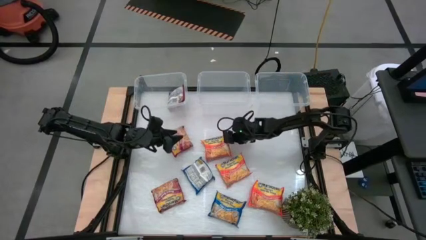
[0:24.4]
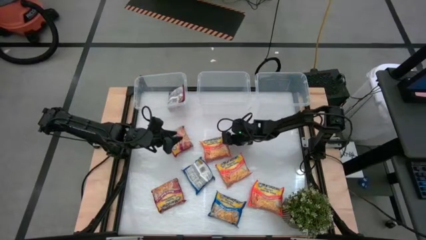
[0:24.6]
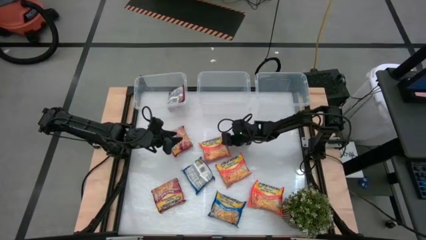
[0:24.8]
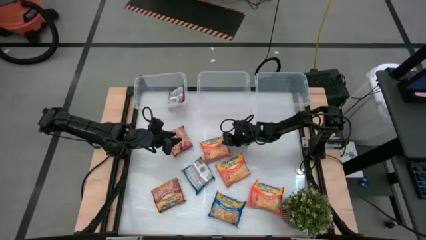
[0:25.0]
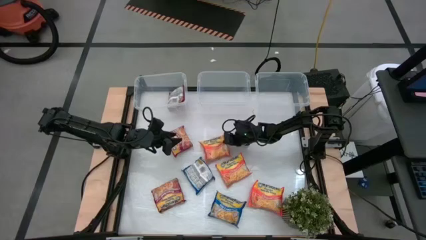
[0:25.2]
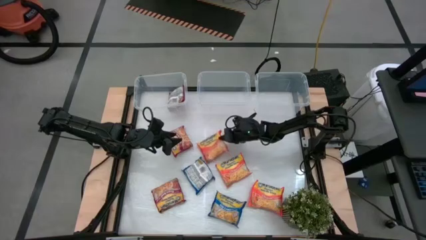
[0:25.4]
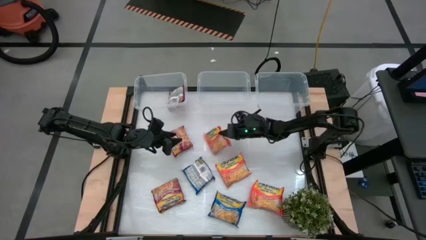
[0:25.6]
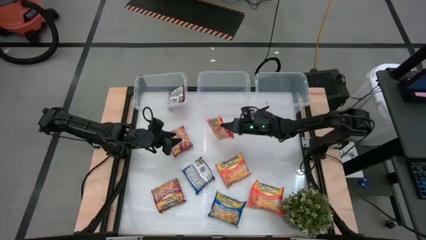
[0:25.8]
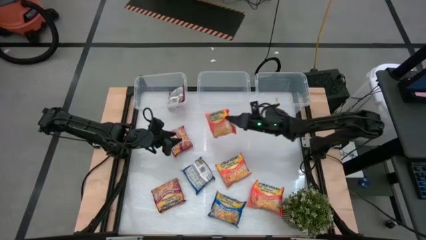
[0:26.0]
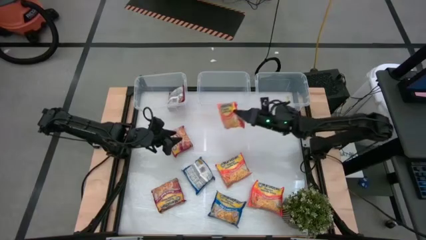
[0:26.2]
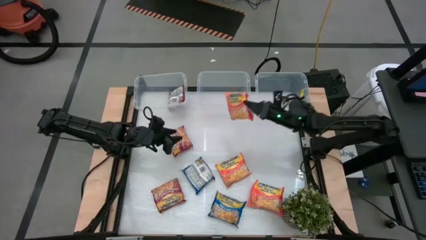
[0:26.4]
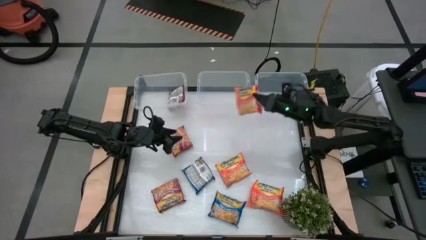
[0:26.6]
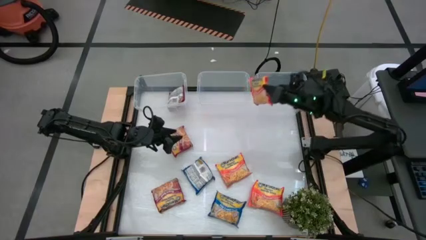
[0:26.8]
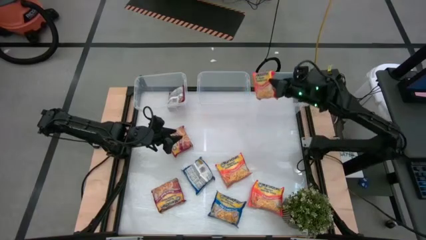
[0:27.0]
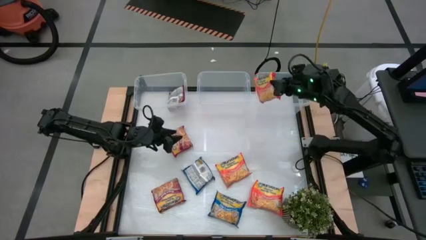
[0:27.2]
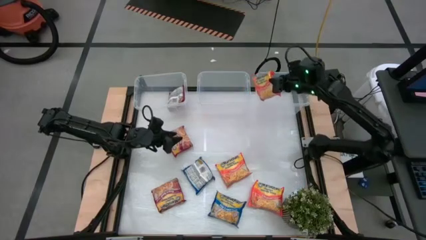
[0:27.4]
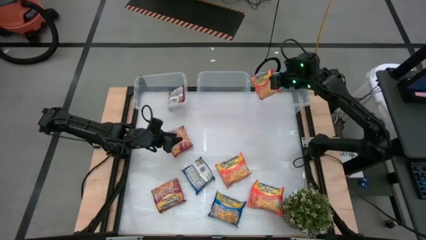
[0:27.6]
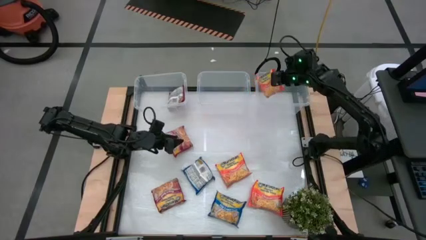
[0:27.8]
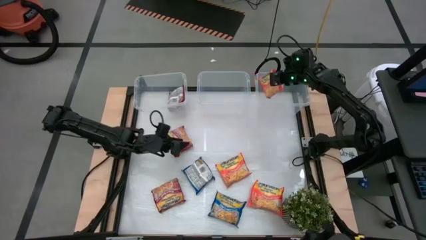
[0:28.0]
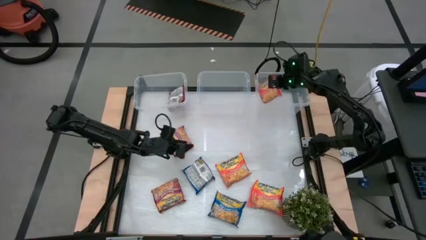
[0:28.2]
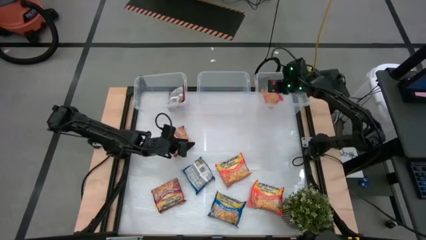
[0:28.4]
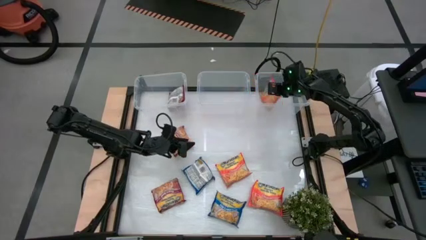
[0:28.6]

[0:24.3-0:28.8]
Task: Sort Maruchan noodles
Put the top orange noodle pack into the right transparent bin

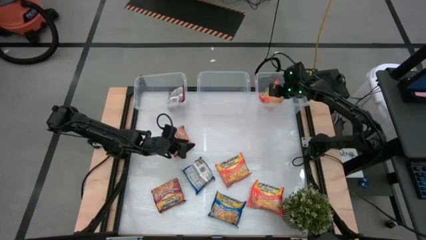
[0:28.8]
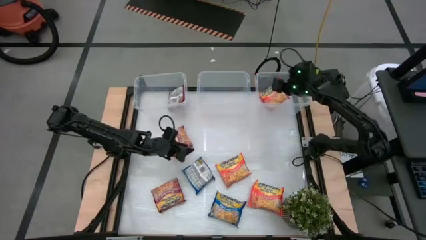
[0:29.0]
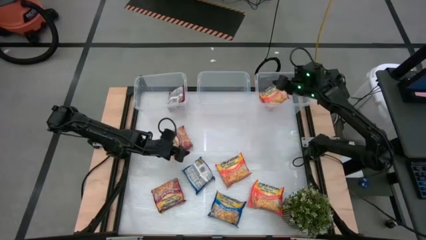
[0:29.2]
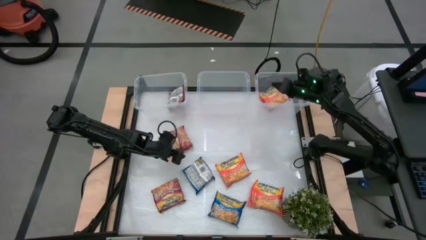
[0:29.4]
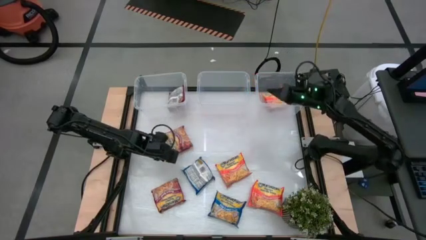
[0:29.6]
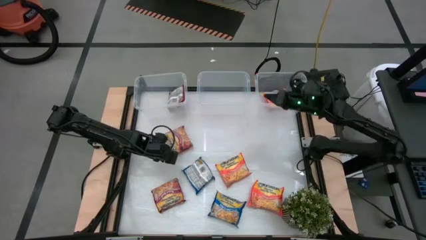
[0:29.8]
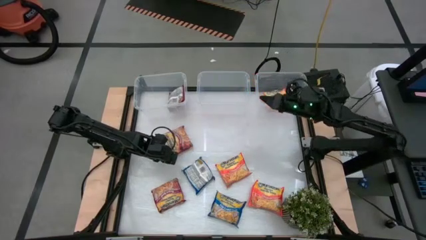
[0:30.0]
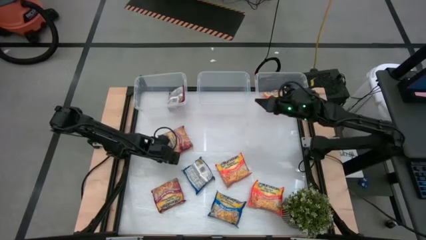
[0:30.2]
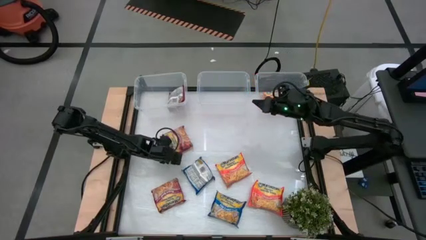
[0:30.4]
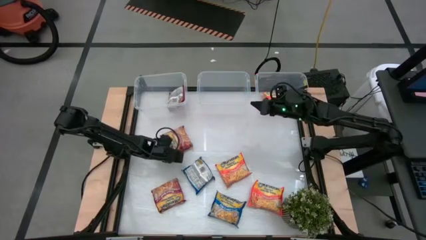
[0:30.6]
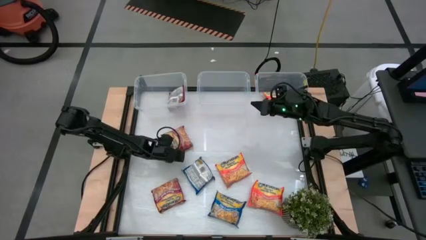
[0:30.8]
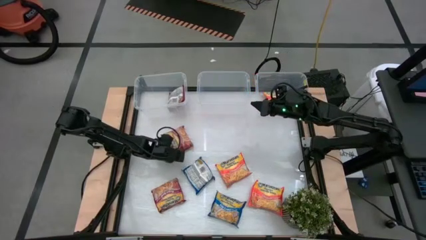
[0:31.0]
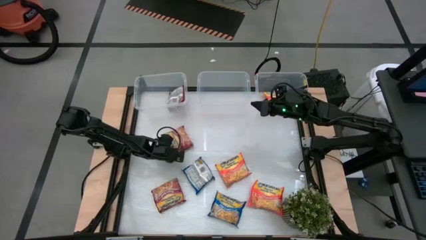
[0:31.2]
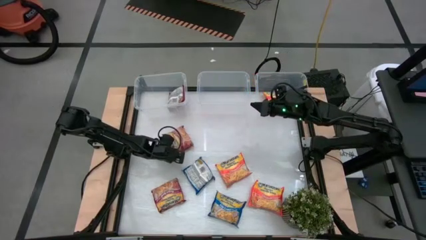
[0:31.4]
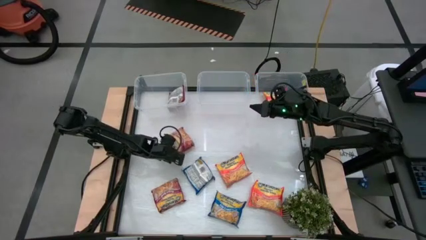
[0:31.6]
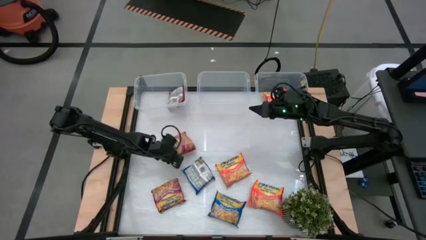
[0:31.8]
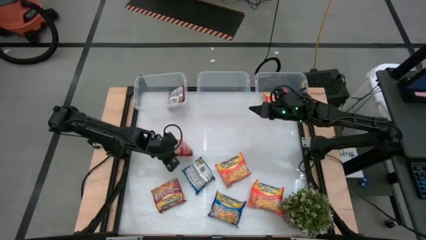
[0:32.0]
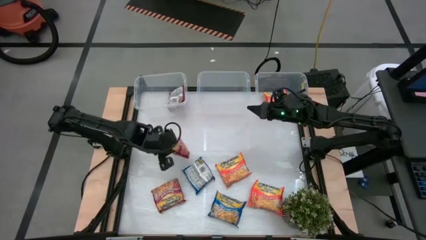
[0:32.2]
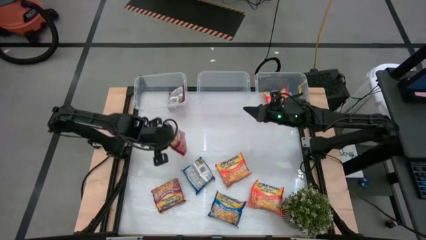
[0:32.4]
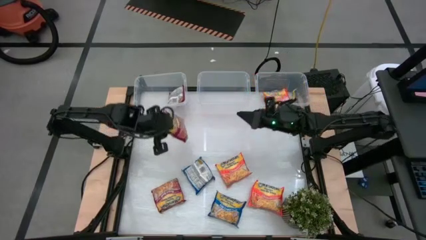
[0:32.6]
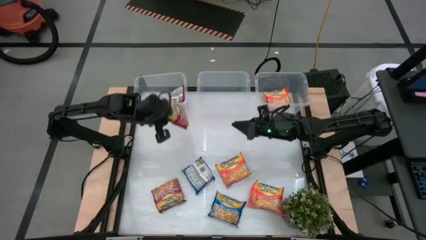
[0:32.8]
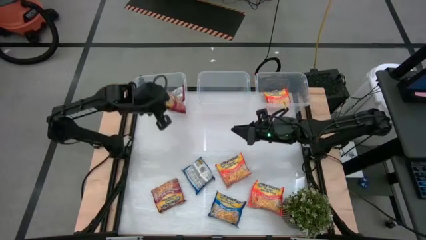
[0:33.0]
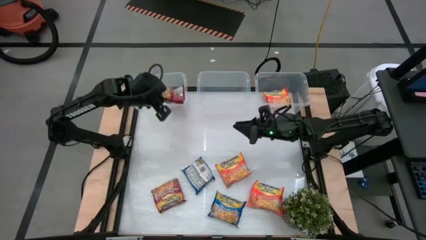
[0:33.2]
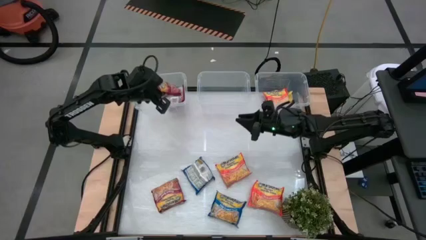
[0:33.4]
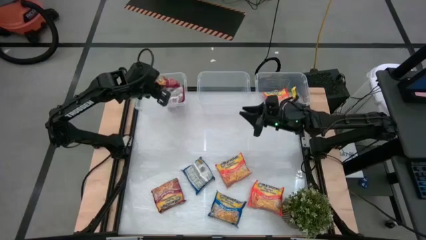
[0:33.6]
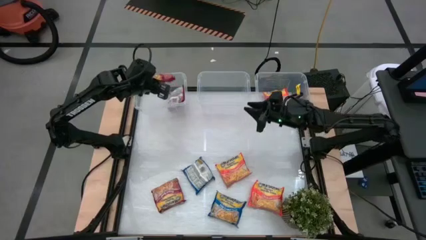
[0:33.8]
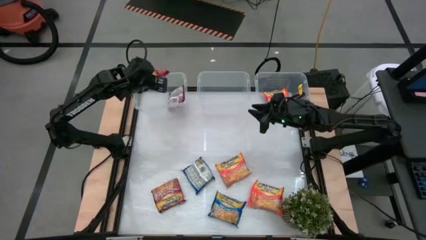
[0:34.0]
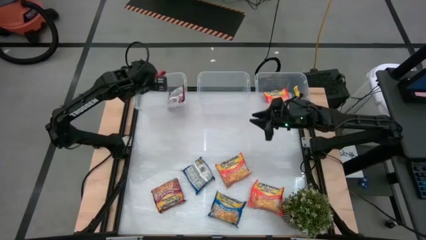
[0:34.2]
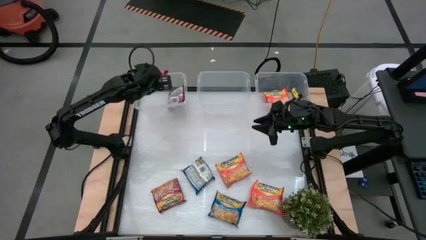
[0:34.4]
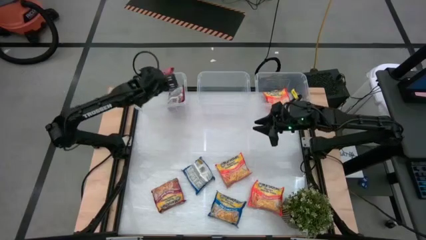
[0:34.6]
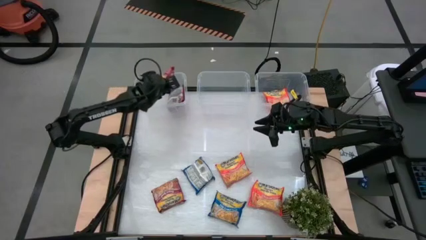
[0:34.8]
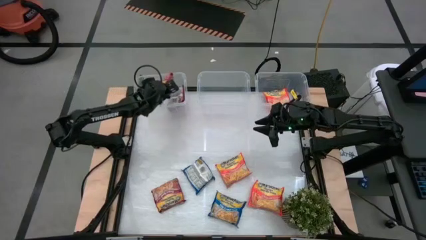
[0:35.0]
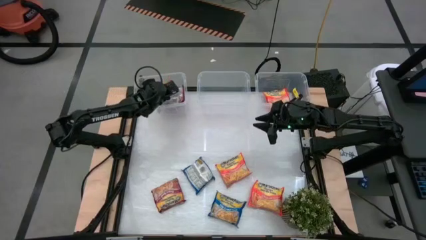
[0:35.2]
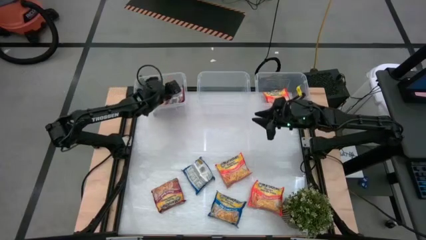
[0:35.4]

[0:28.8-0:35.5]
Put the top red noodle pack into the left transparent bin

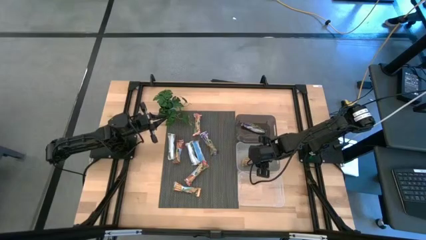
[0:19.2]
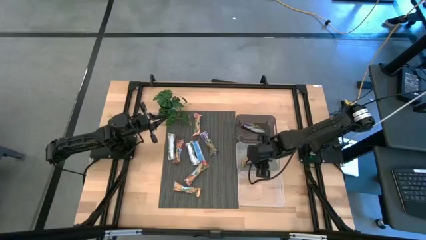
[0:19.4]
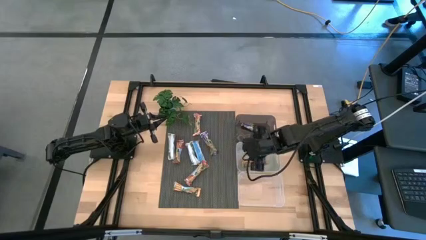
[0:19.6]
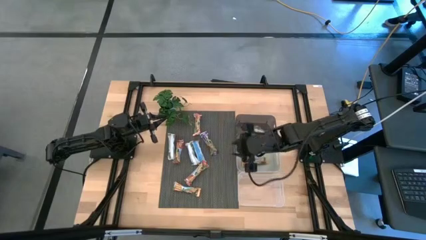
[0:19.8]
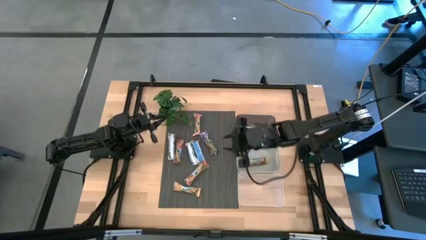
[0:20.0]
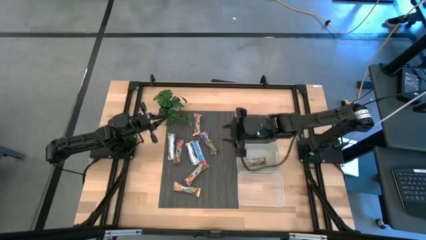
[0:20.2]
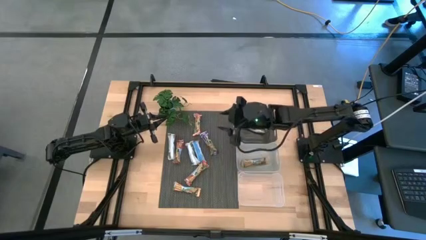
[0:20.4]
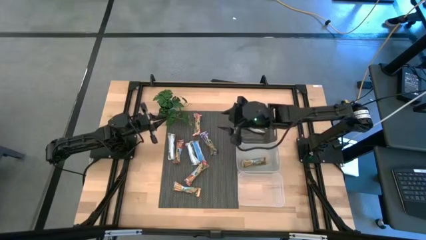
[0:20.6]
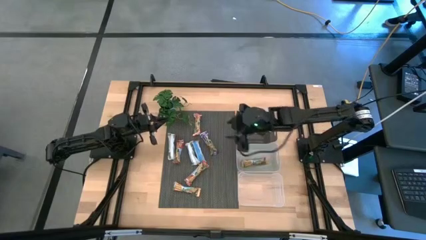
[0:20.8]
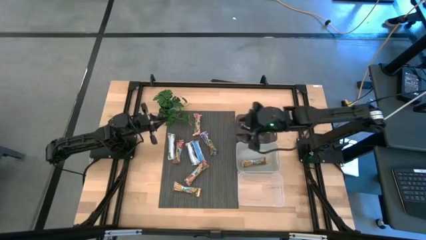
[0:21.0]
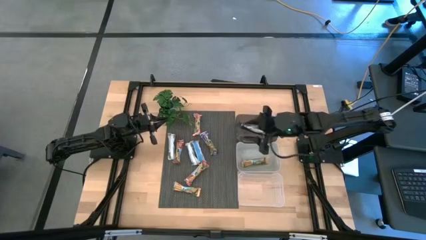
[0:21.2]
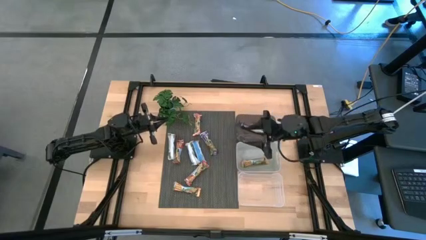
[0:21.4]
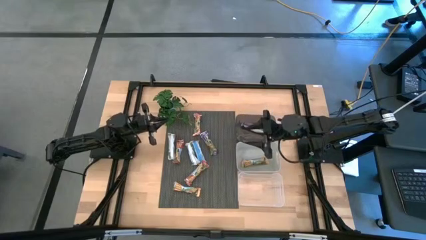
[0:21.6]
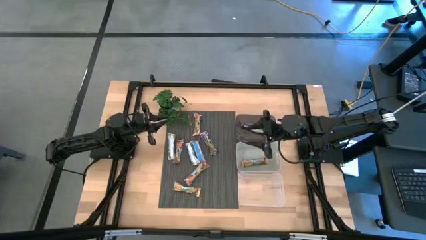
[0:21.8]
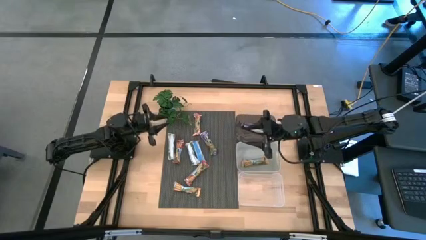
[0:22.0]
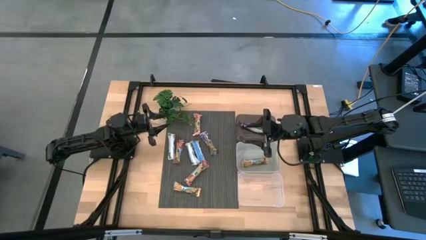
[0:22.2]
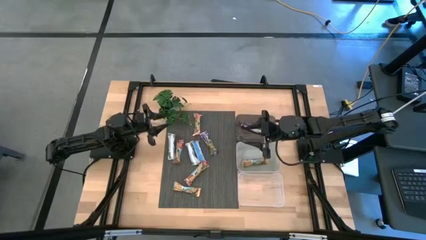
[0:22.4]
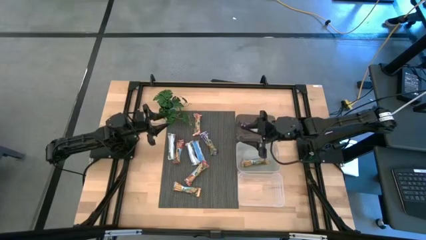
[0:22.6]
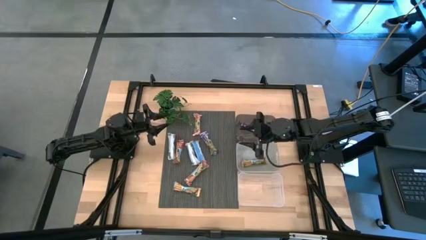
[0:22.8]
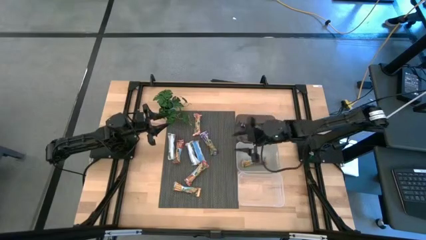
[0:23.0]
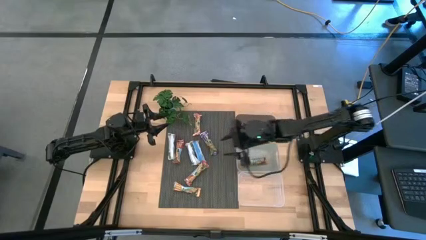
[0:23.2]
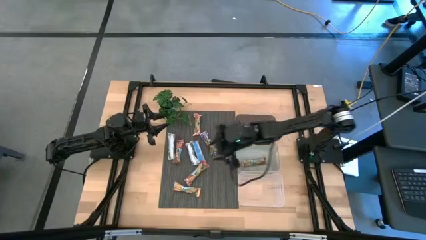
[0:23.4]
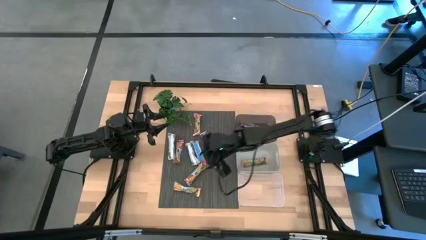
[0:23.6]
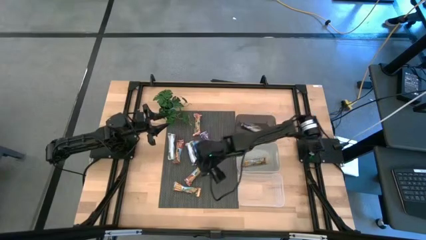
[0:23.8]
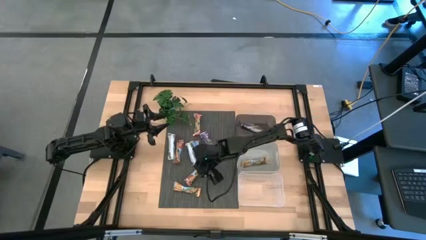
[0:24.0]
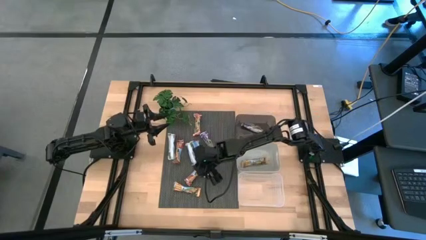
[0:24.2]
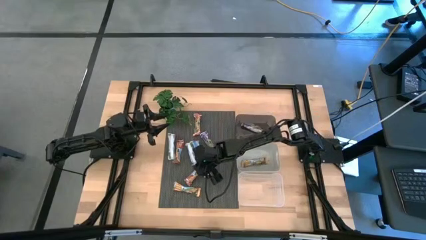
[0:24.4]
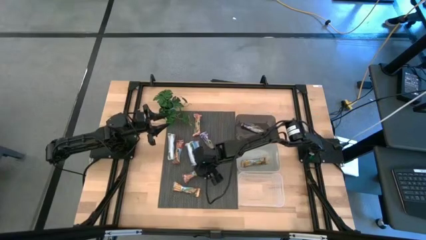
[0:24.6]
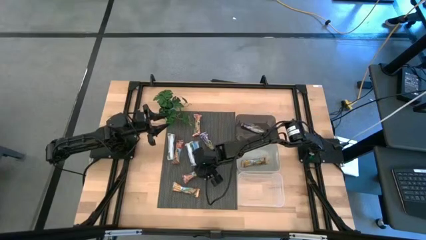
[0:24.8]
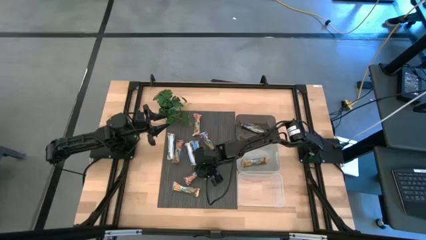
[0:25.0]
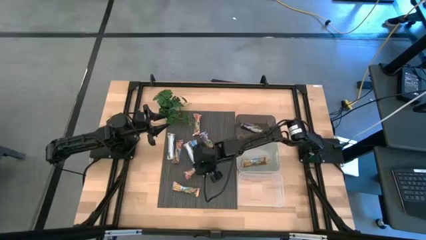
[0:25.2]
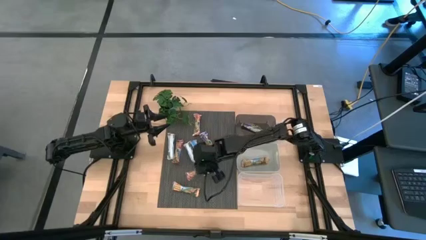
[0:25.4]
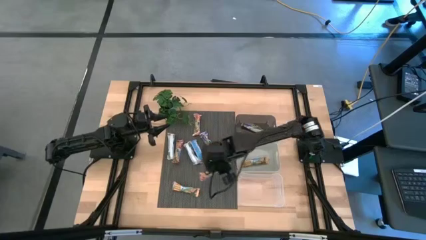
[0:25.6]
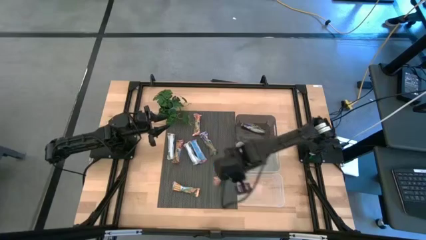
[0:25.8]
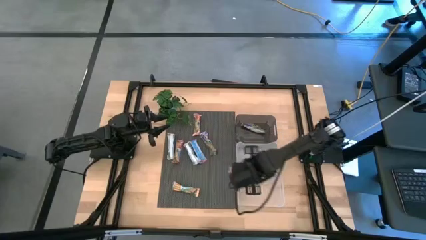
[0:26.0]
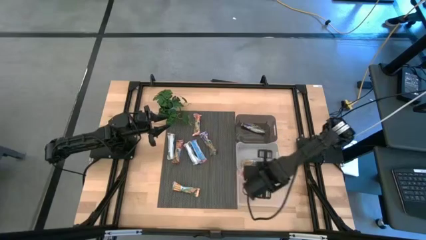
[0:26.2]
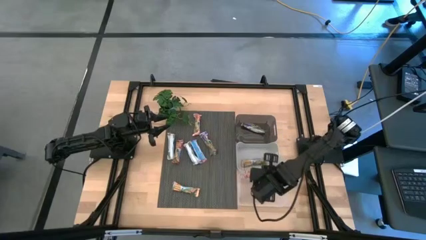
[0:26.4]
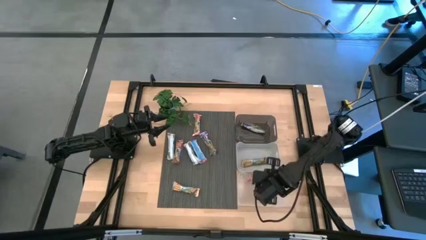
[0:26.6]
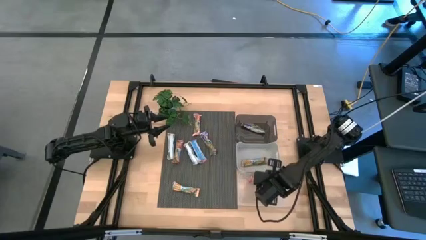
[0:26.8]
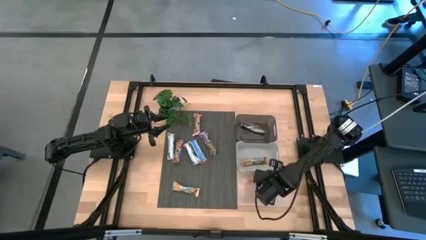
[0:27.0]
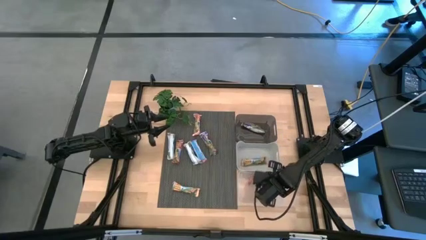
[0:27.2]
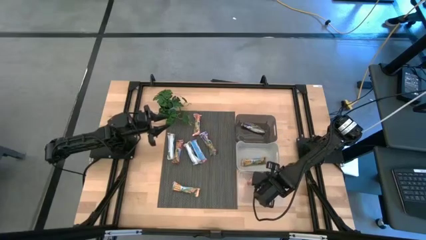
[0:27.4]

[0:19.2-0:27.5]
Task: Pick and place Granola Bars by type
Put the red granola bar into the transparent bin
